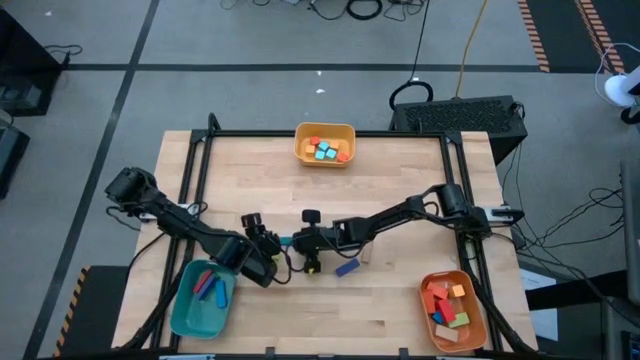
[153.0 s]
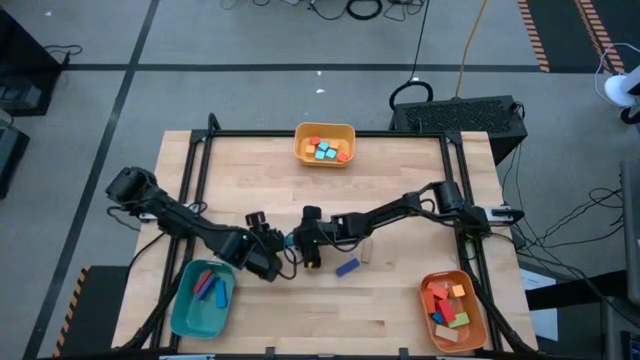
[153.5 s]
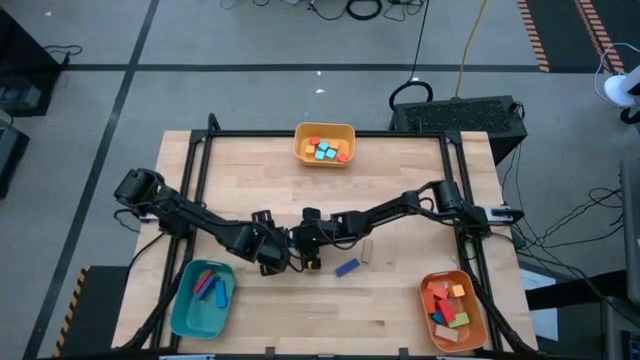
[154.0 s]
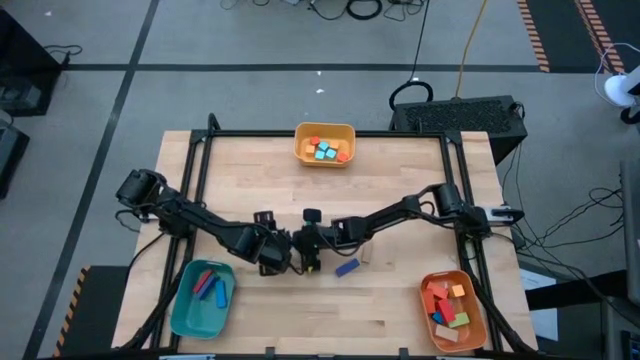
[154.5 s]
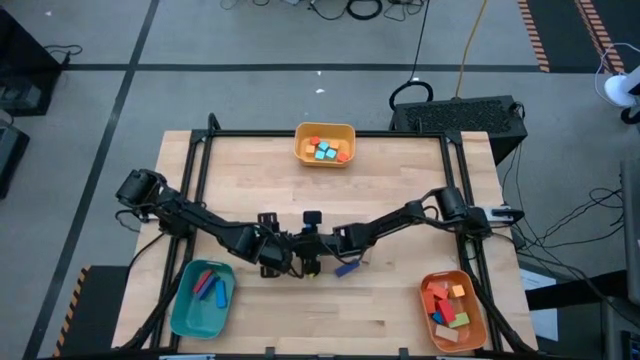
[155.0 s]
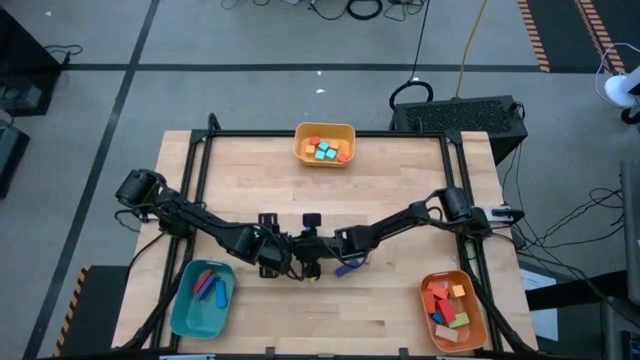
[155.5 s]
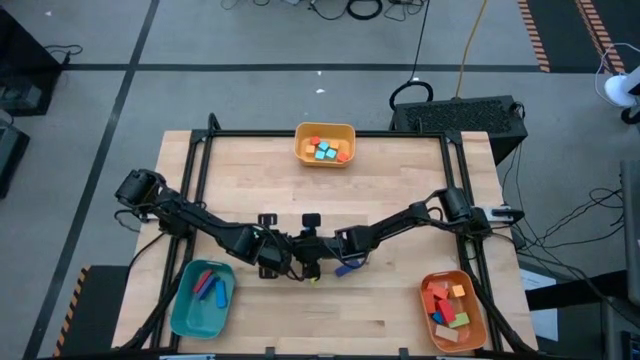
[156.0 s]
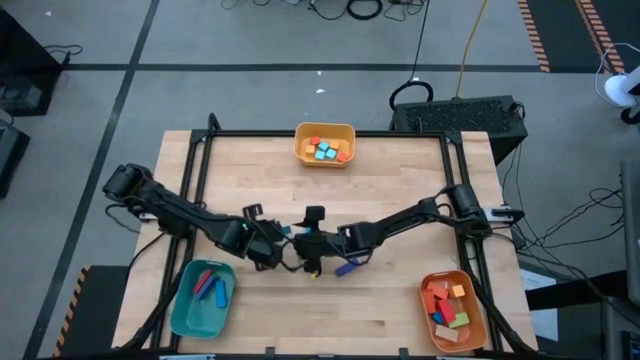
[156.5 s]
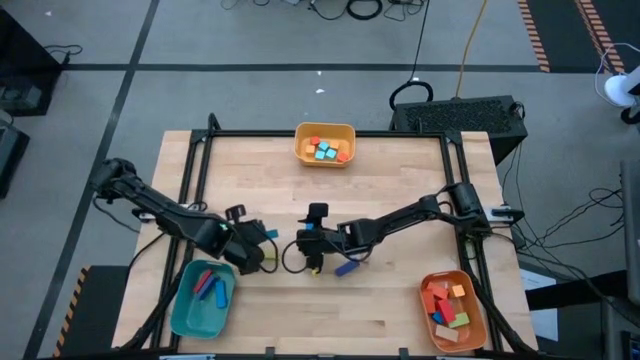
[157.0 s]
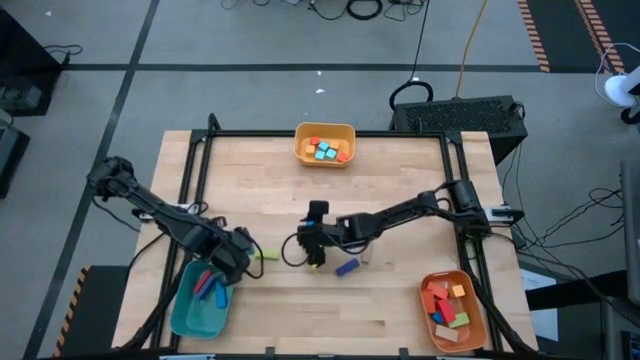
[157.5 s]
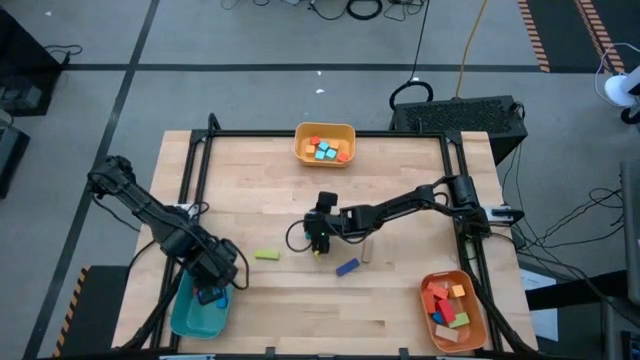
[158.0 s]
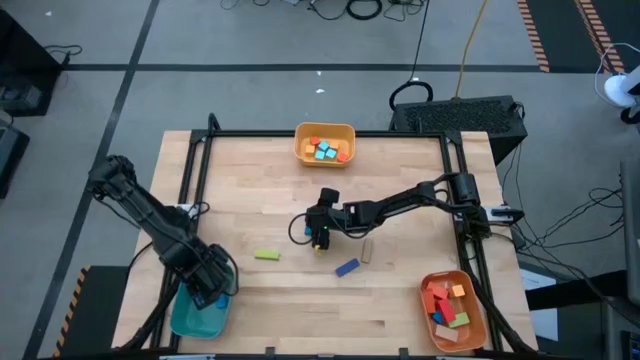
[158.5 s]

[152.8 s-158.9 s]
Task: Sort blocks by size
Put the small dark blue rectangle block into the green bin

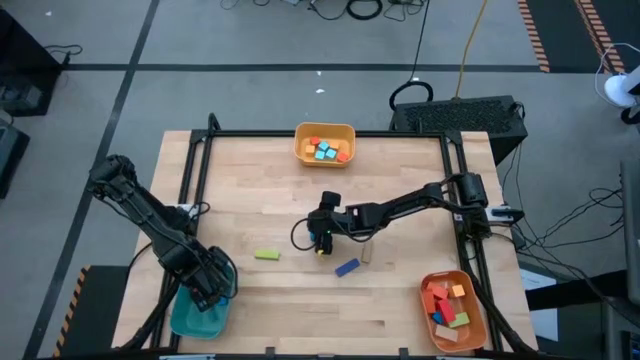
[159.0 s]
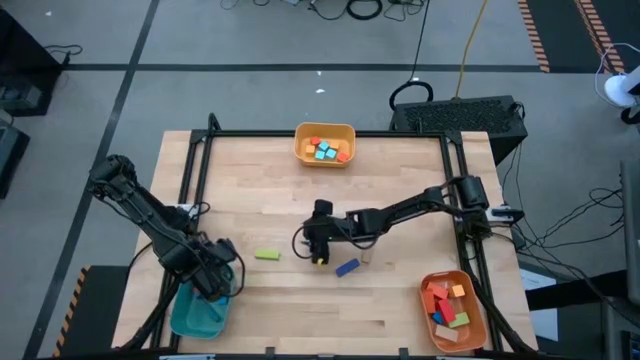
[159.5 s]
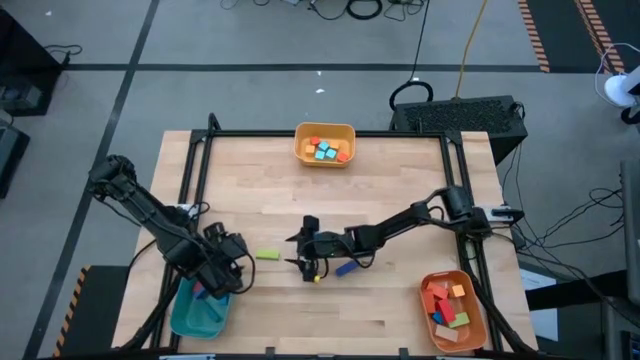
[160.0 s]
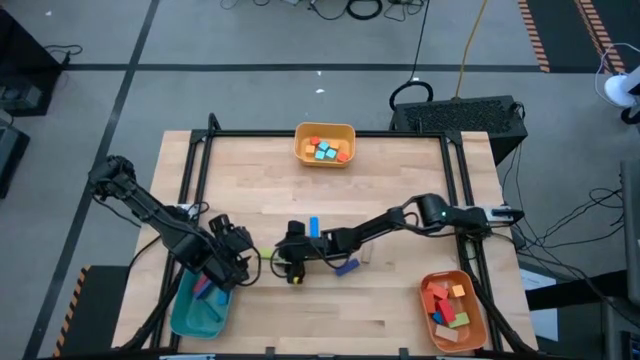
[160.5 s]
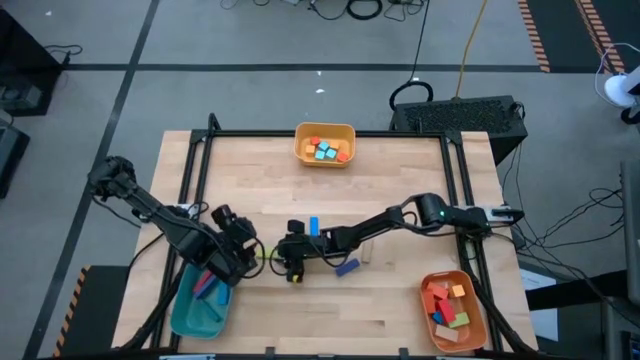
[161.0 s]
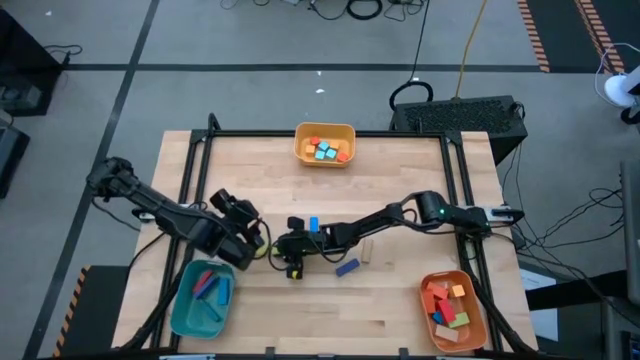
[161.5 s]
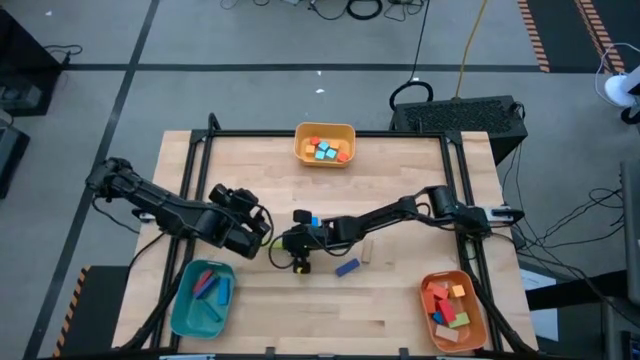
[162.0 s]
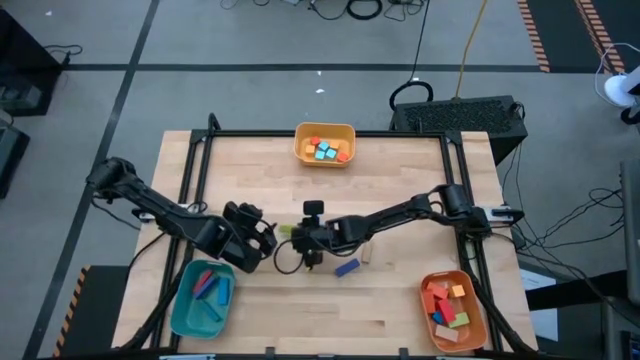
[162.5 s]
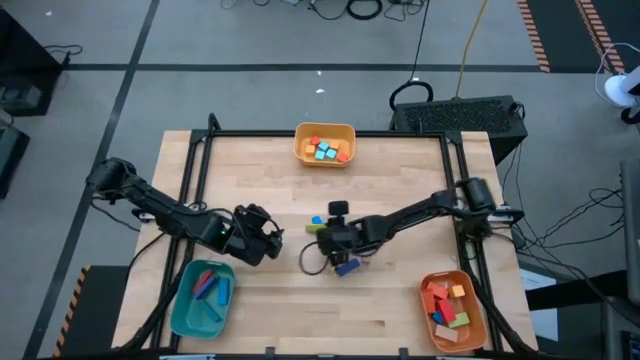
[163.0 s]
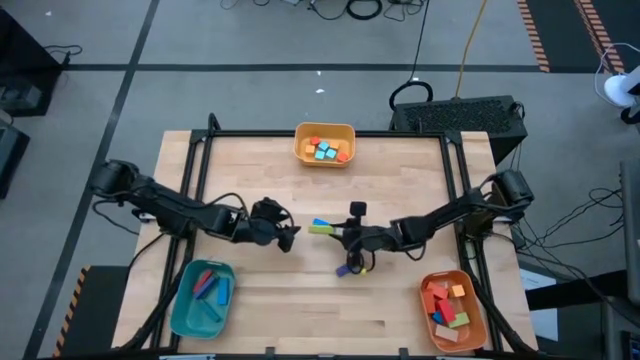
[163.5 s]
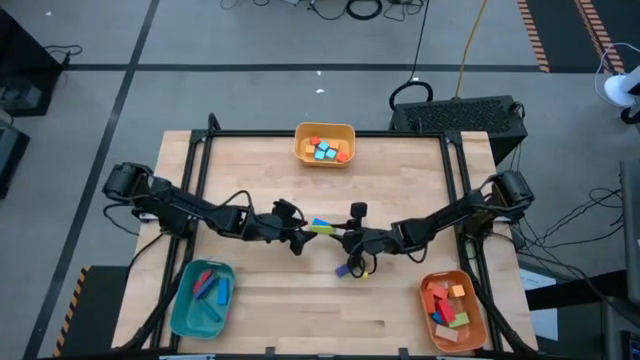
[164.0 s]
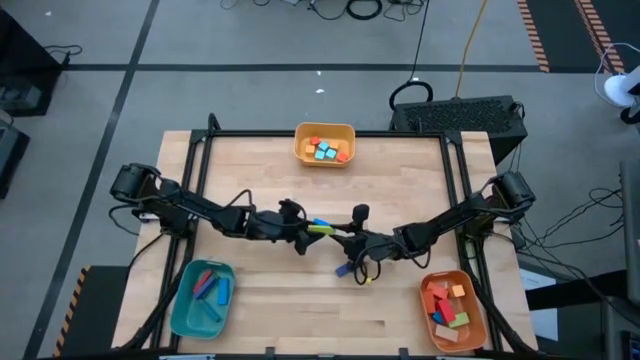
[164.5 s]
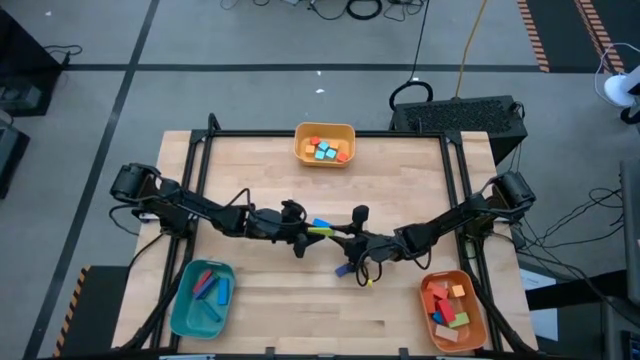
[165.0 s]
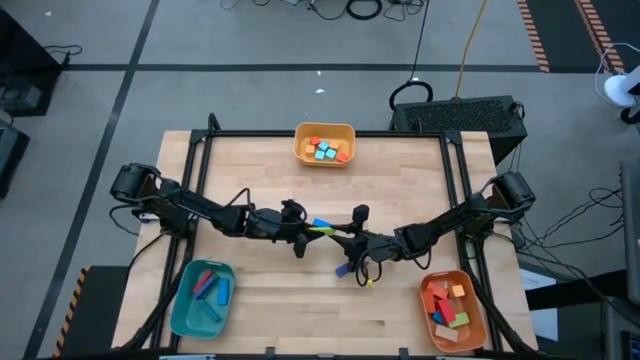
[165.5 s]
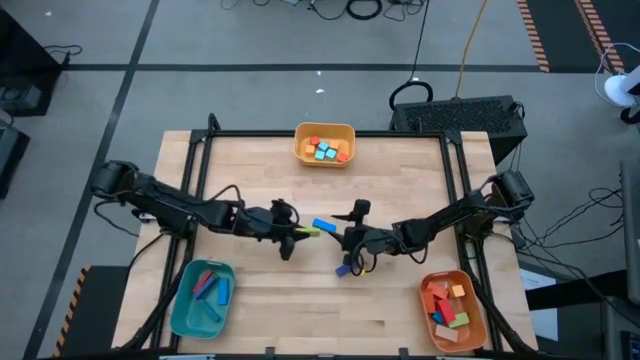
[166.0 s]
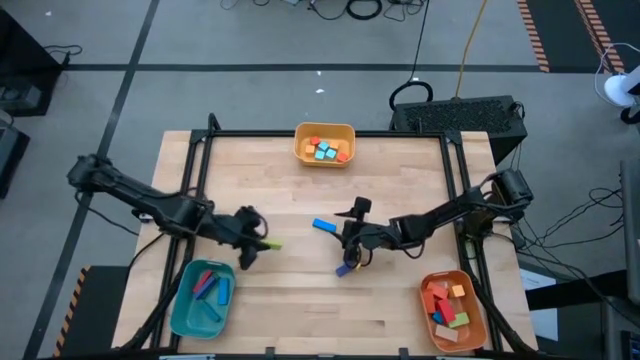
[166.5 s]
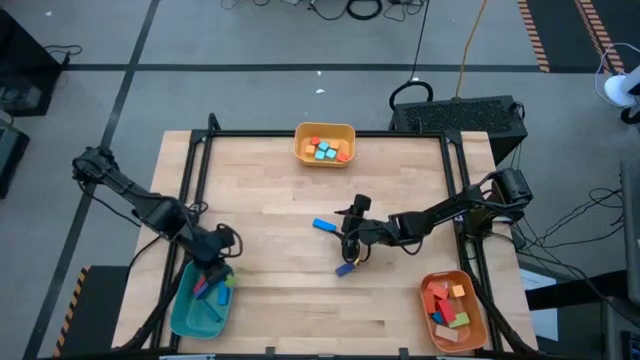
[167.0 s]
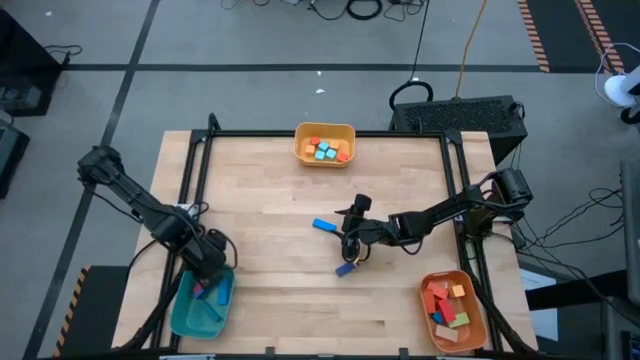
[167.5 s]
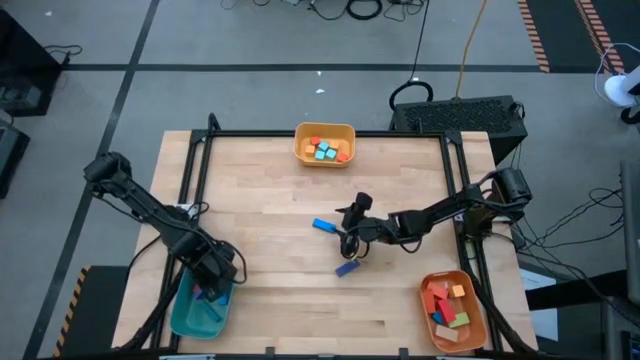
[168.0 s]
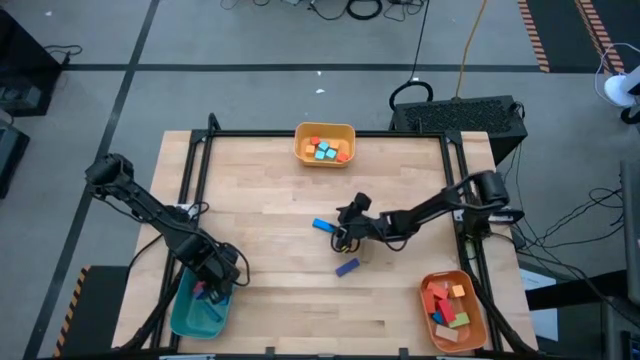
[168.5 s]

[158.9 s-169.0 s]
Put the small light green rectangle block into the green bin

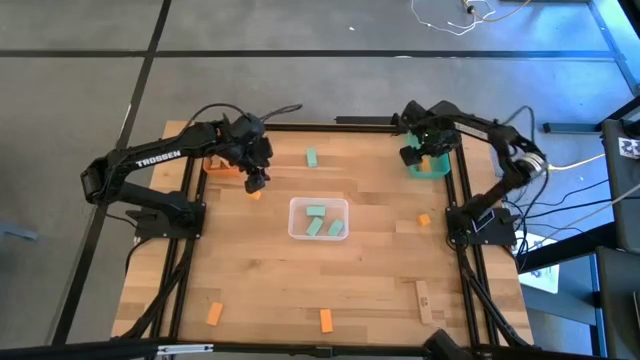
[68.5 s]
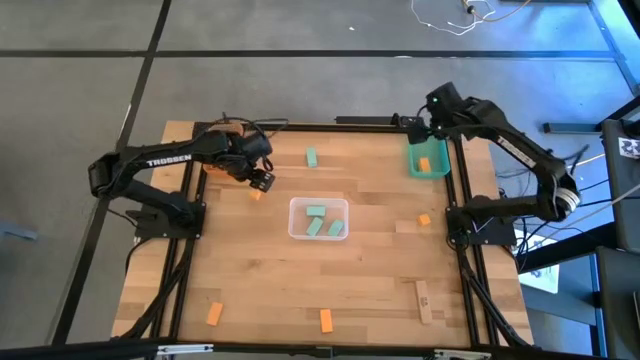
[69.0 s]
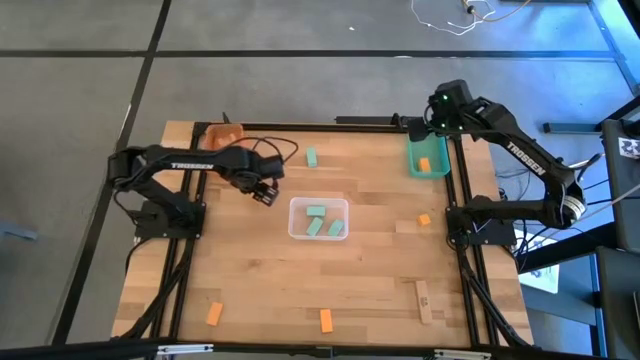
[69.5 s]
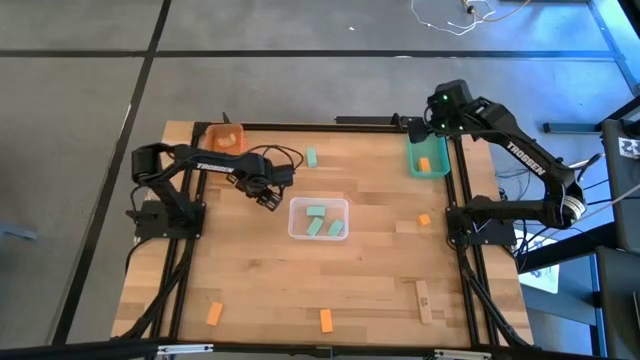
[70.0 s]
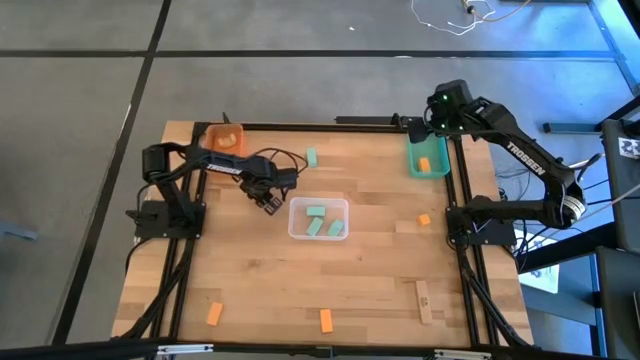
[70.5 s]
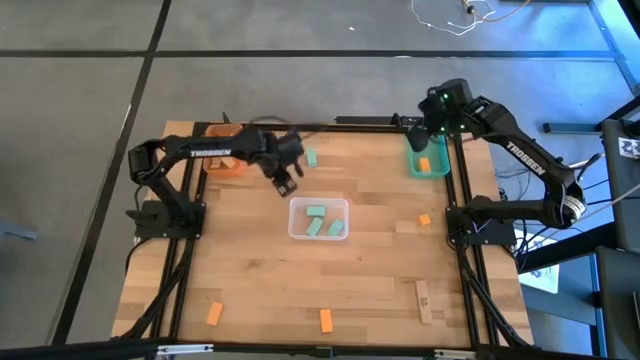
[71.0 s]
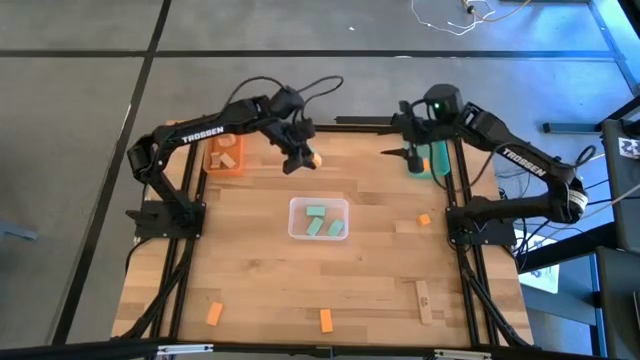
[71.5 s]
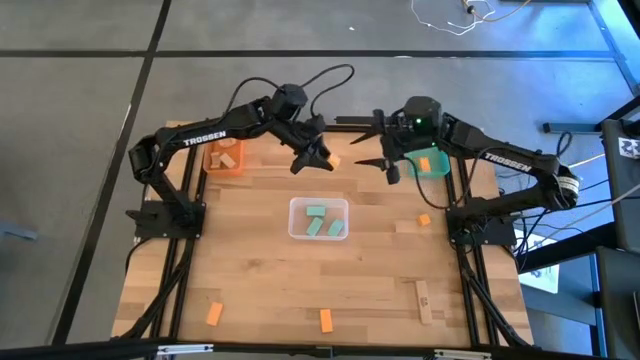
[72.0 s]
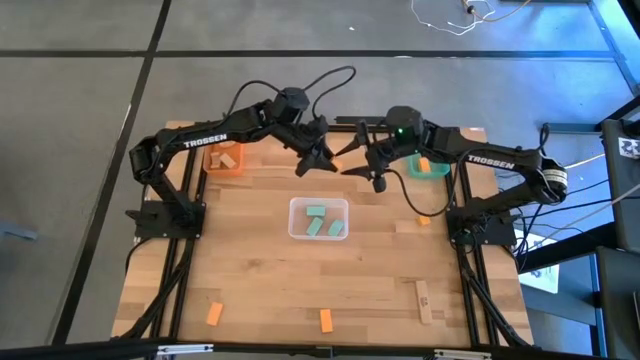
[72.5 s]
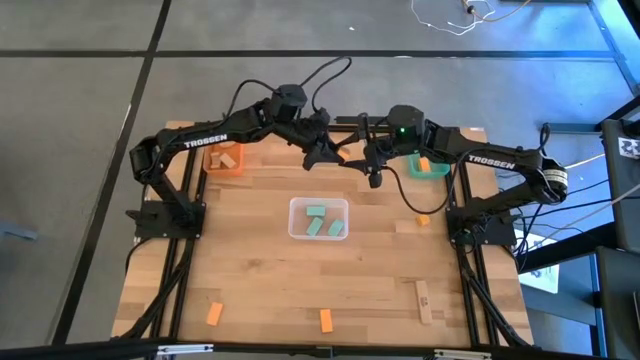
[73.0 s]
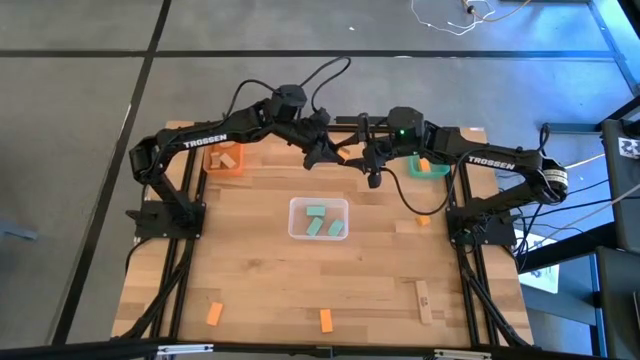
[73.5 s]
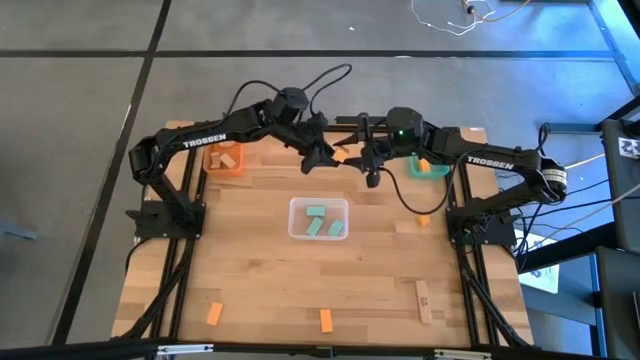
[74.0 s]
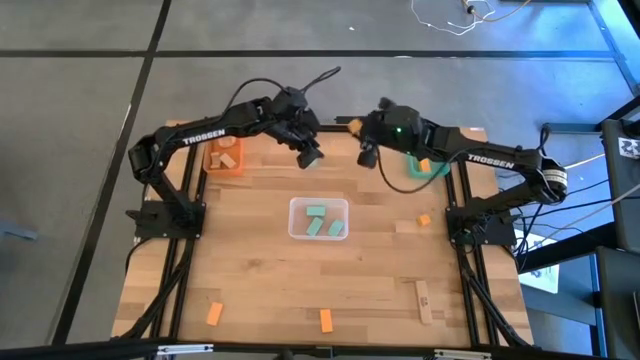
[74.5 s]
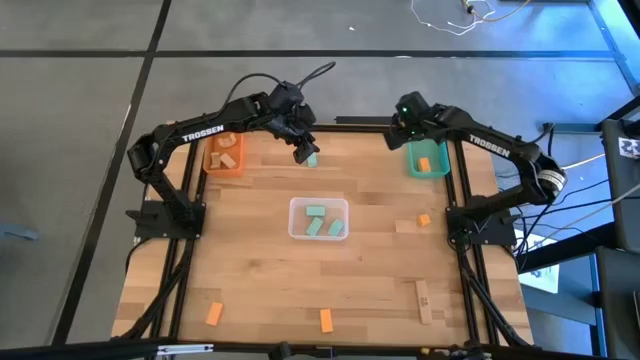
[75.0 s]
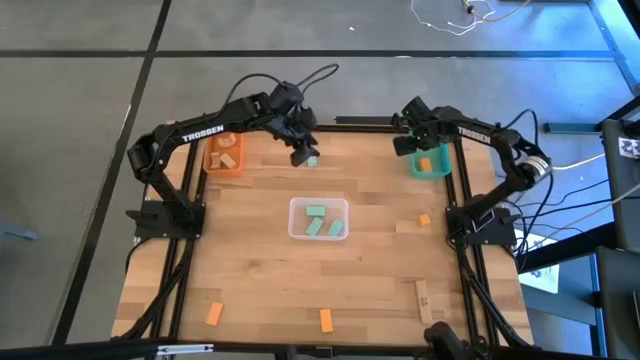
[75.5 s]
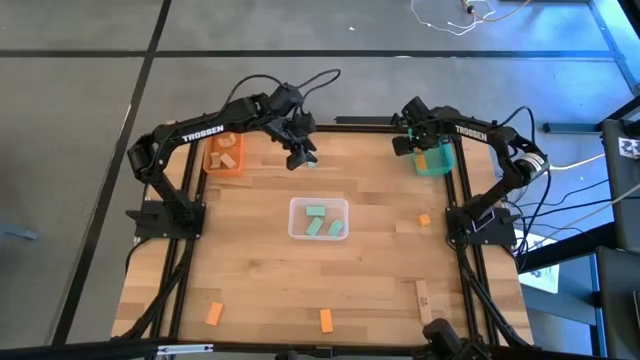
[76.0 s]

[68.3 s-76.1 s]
Task: Sort & place blocks by color
Put the yellow block into the blue bin
